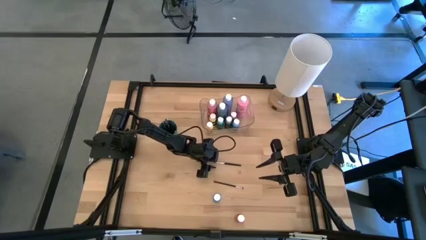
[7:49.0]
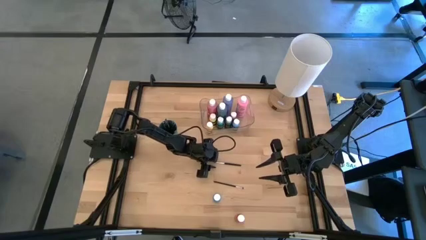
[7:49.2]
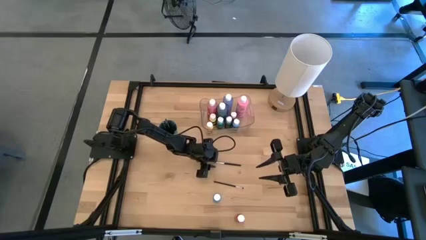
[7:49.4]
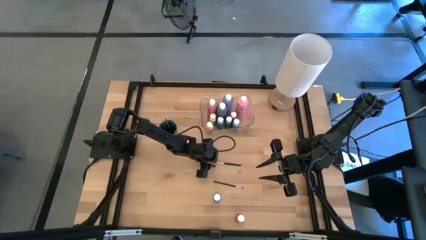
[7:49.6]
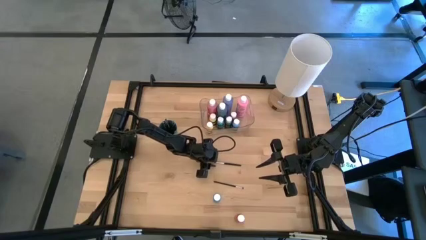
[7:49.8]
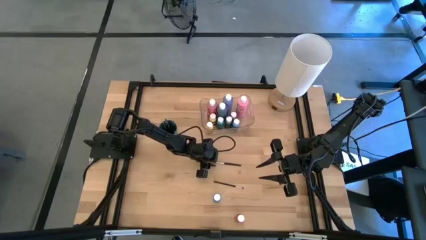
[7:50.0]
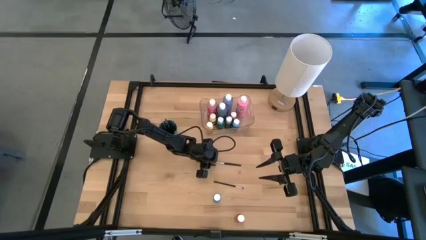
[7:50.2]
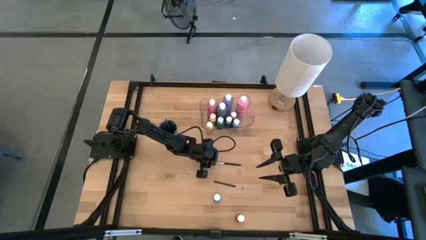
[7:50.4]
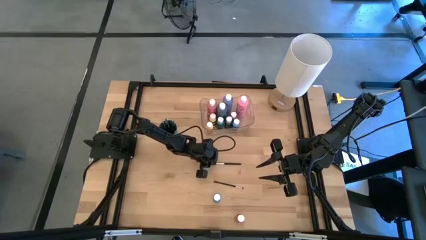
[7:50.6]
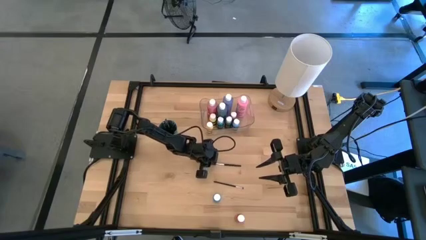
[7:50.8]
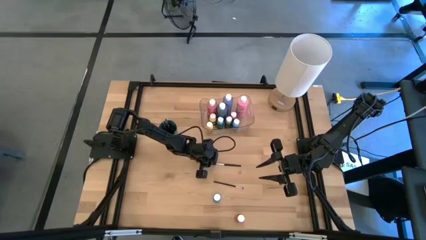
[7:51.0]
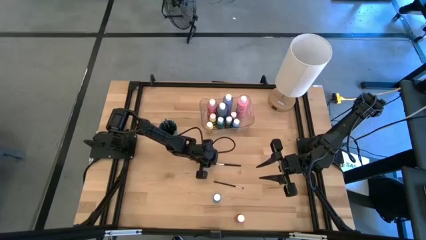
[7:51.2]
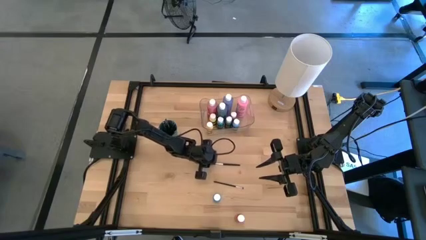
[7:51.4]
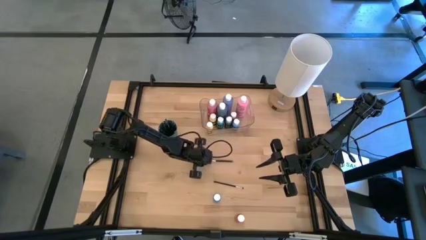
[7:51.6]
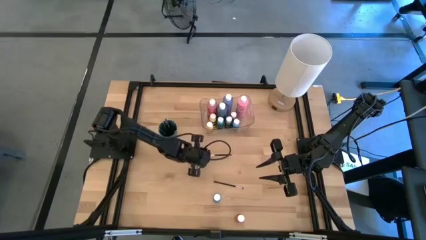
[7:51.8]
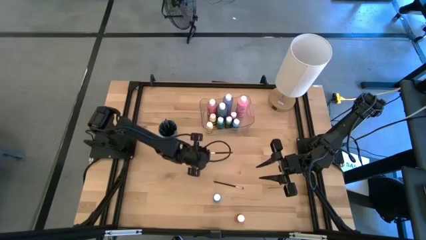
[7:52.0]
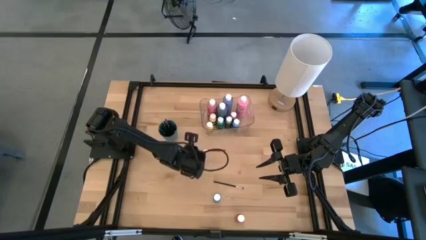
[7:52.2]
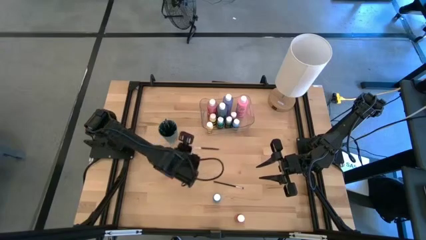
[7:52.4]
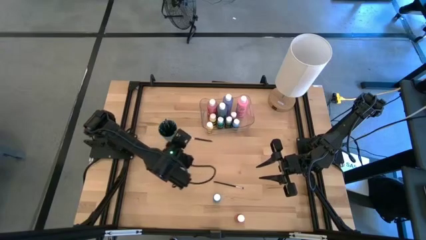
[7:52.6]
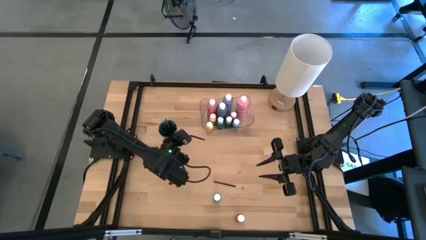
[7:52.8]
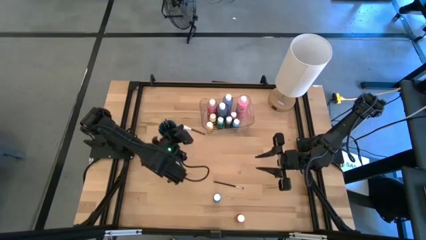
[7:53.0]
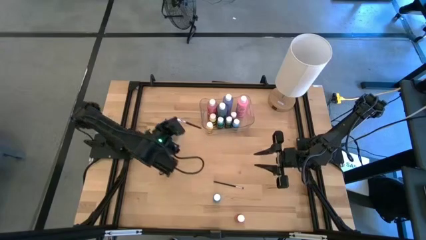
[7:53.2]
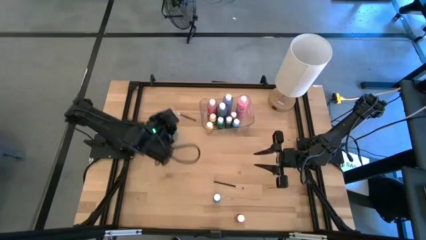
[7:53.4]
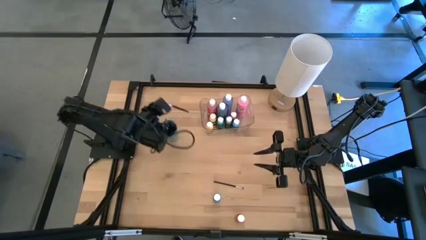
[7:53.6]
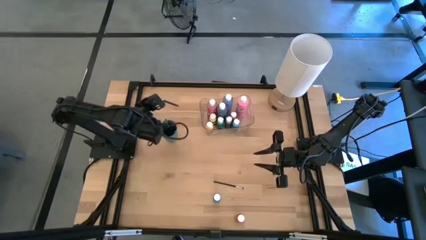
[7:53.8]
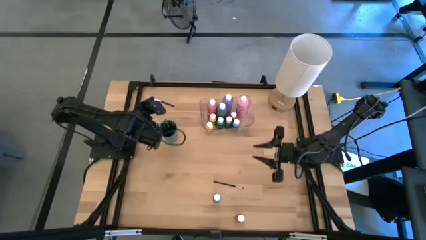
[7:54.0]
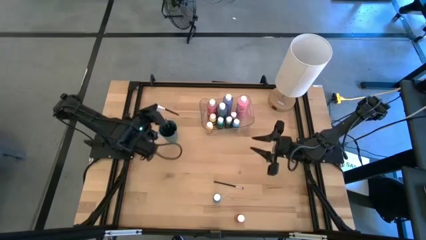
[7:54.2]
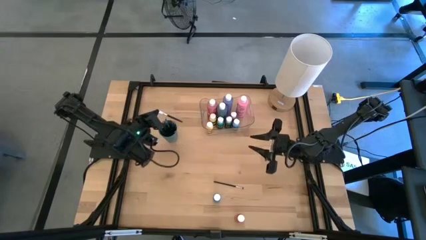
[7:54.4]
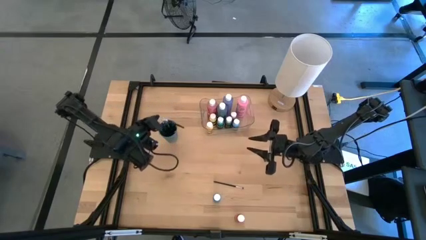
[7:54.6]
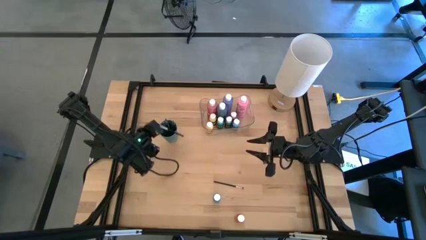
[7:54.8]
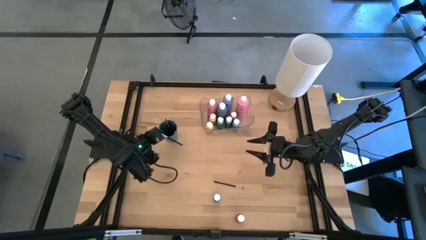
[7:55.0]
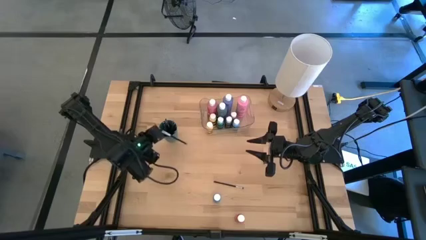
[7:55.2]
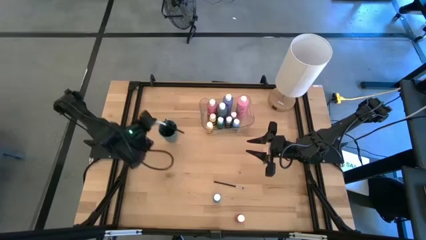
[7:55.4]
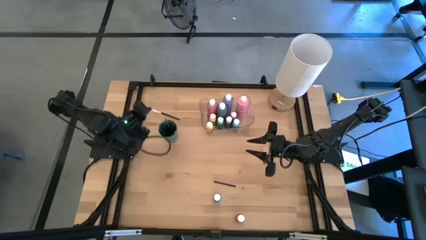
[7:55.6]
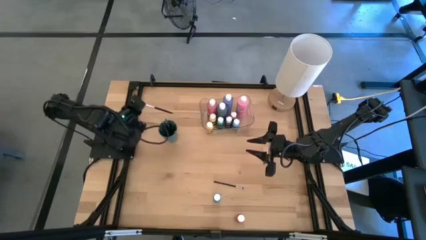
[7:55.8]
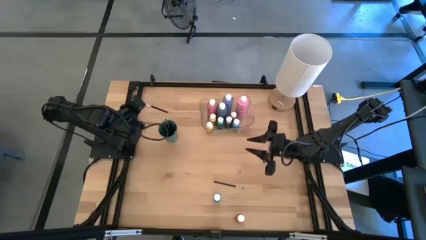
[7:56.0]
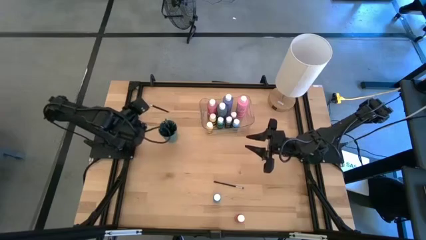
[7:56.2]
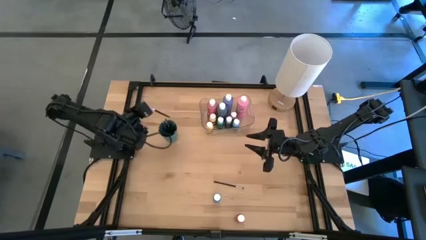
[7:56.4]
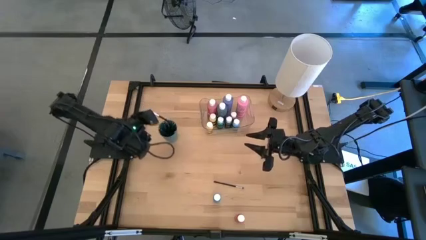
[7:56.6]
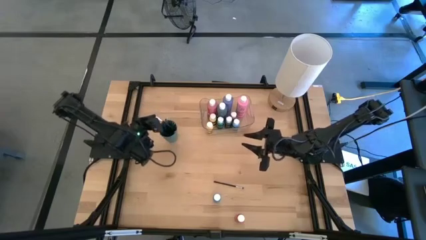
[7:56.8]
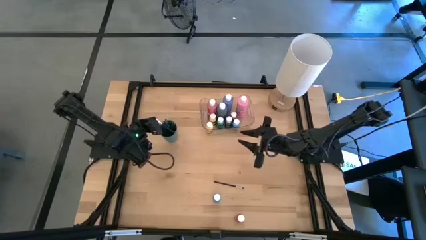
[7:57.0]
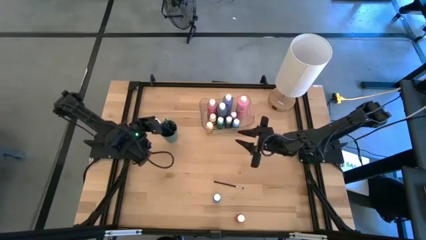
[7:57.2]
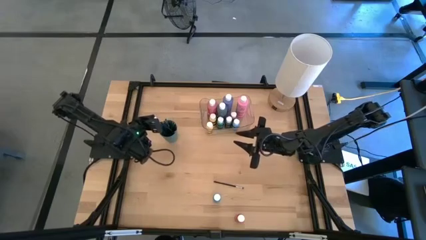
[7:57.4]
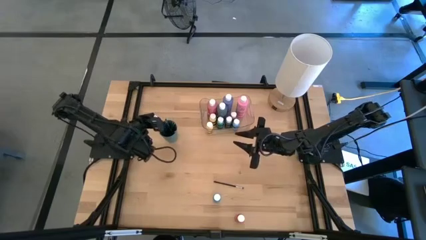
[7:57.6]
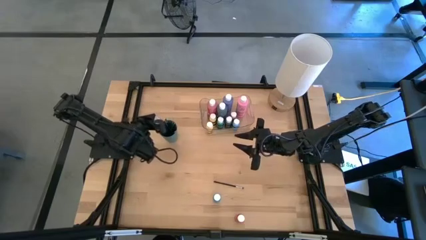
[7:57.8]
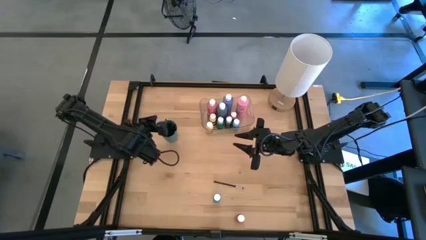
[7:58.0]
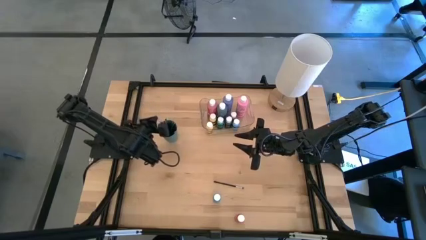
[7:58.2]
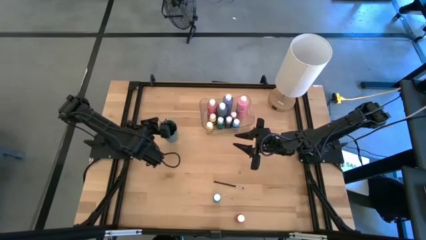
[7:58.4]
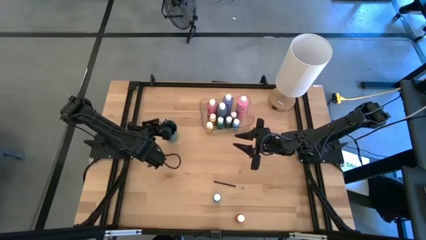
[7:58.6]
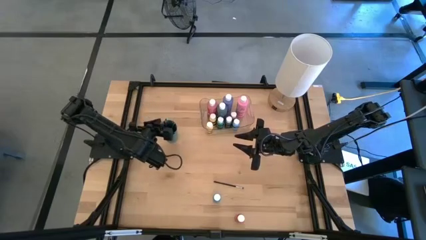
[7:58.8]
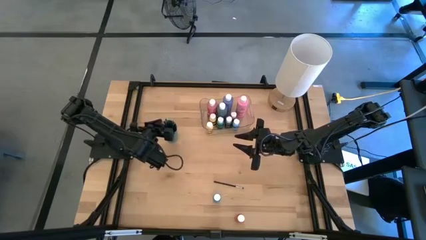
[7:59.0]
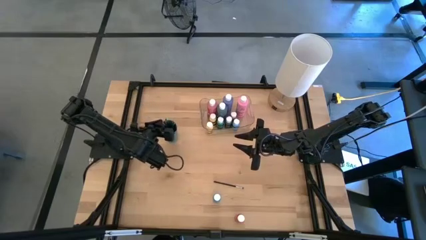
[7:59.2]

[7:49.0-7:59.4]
Task: Pick & Place Paint Supplies
Put the black paint brush into the green cup

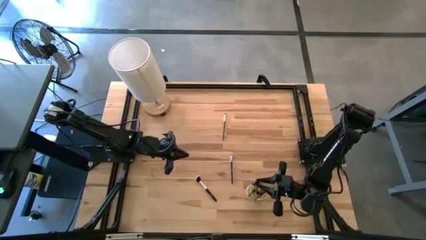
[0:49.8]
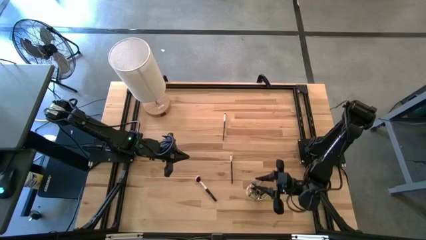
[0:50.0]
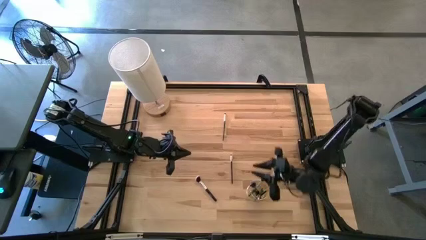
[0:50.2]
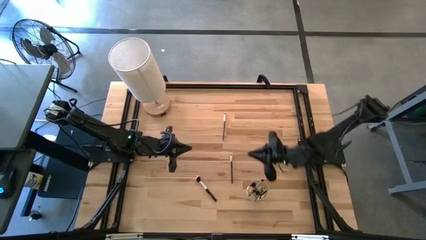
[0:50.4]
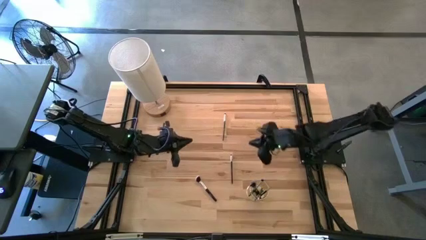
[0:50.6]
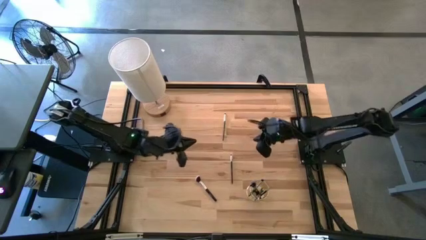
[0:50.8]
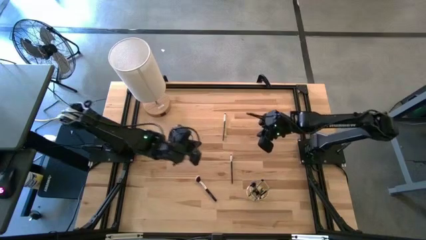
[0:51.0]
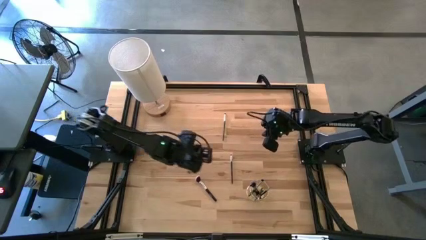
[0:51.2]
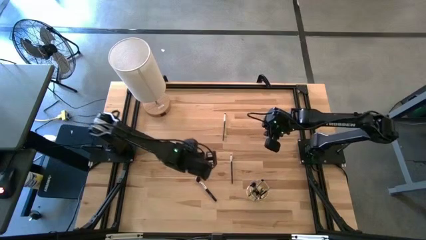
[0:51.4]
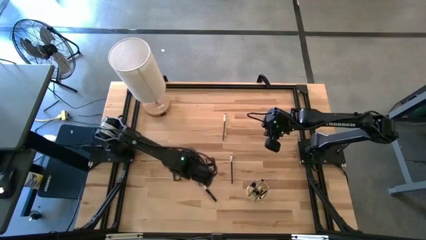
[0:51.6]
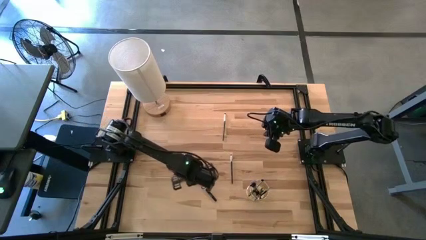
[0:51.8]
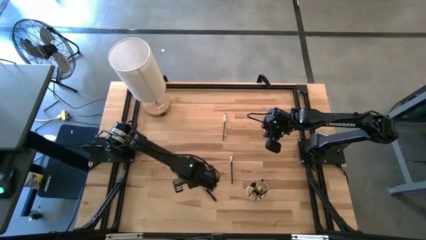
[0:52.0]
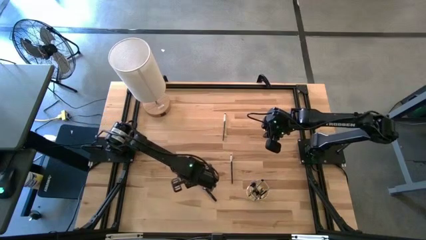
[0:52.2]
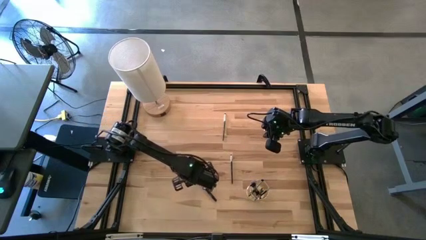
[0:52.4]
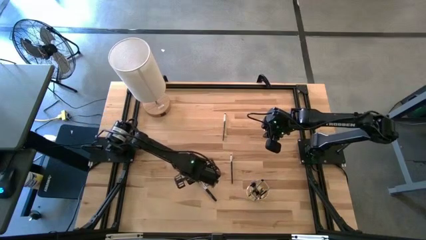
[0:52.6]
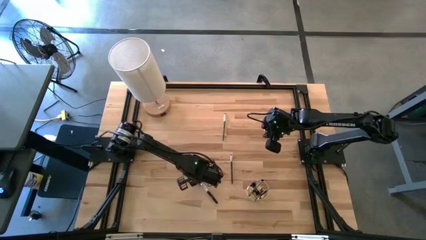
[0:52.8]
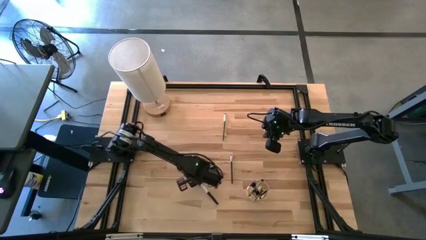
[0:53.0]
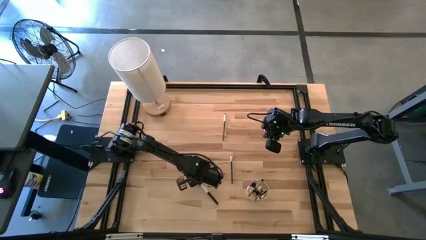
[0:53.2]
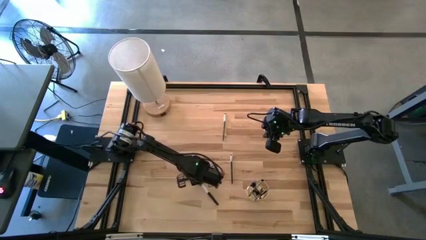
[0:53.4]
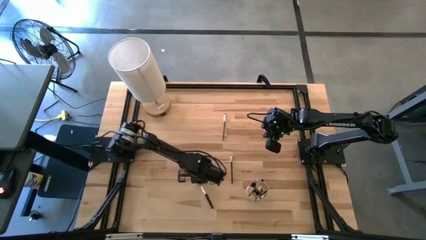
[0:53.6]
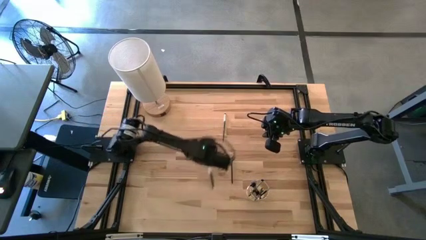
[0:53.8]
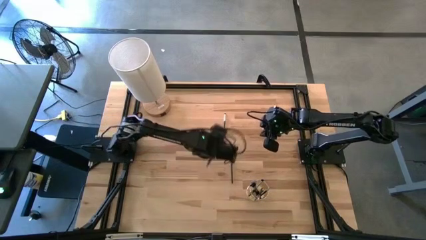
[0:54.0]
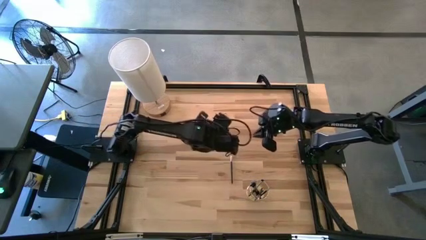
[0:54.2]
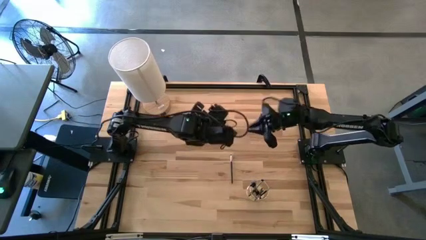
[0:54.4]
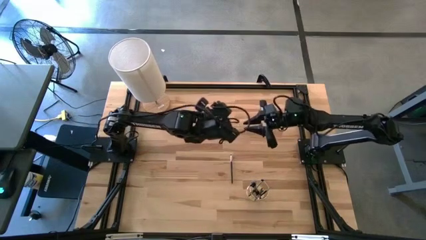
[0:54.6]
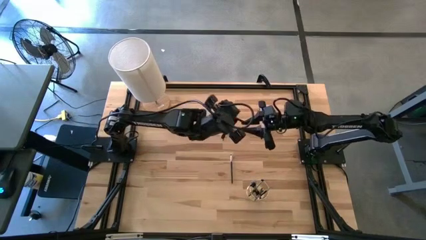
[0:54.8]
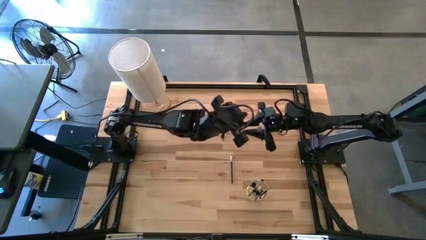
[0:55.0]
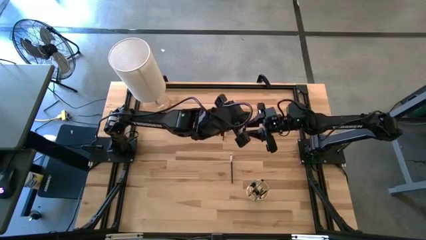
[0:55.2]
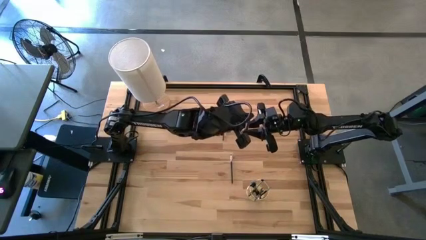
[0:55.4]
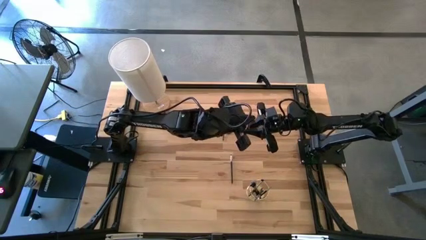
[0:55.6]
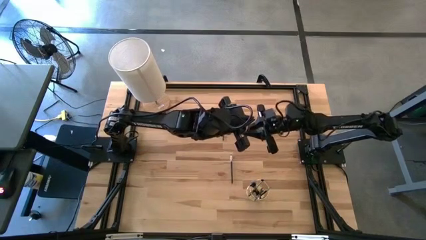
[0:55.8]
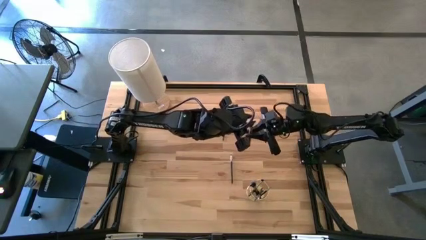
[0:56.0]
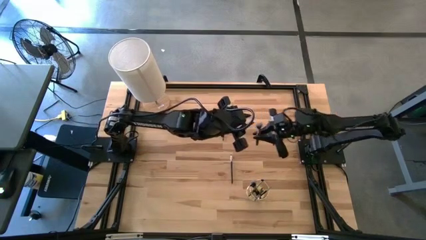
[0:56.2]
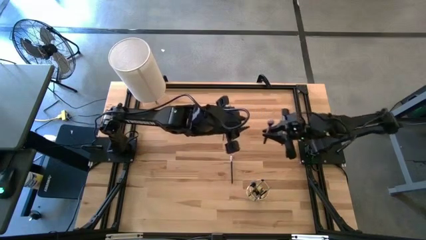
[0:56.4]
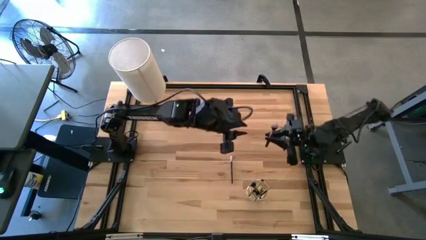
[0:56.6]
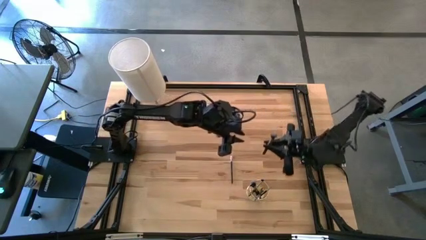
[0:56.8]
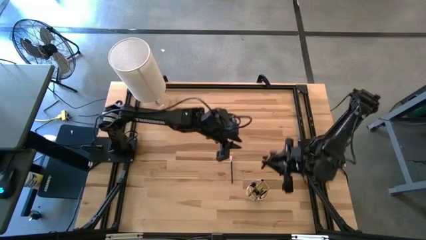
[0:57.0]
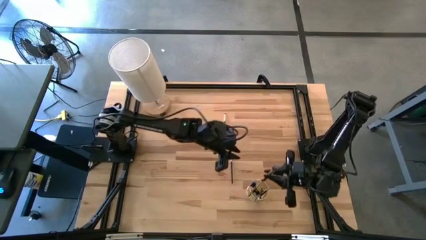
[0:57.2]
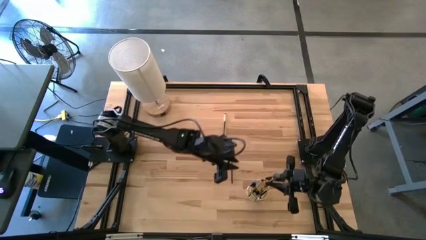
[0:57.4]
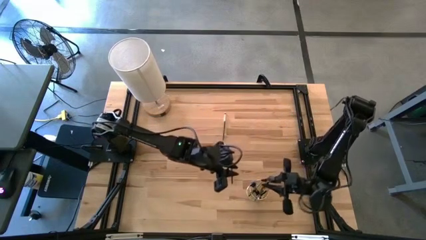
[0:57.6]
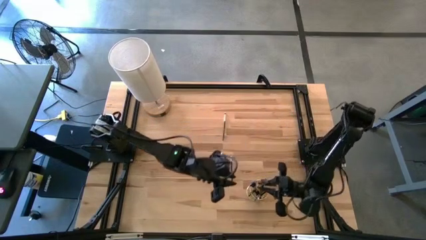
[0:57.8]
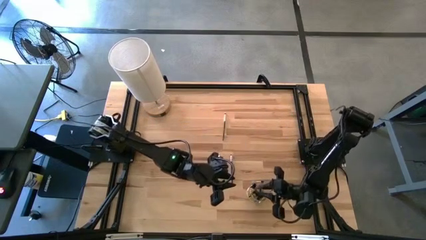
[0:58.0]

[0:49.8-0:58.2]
Task: Pick & Place Makeup Brushes
Put the powder brush into the makeup holder
